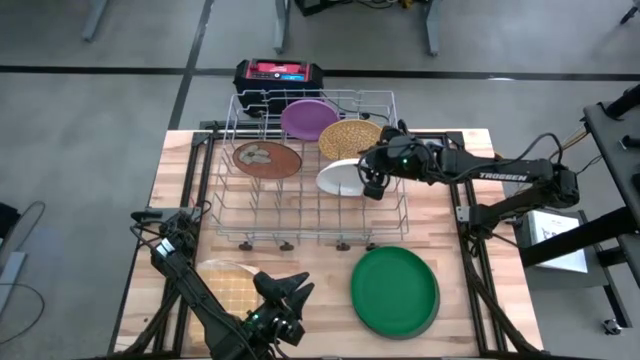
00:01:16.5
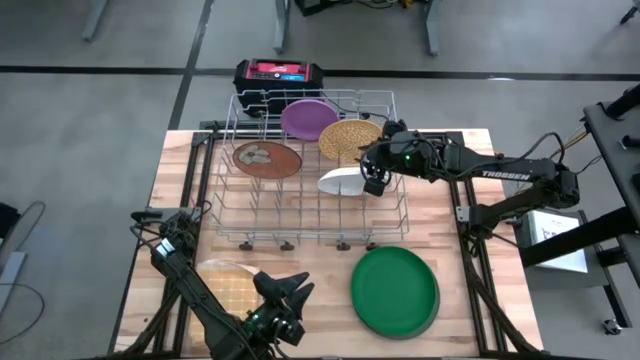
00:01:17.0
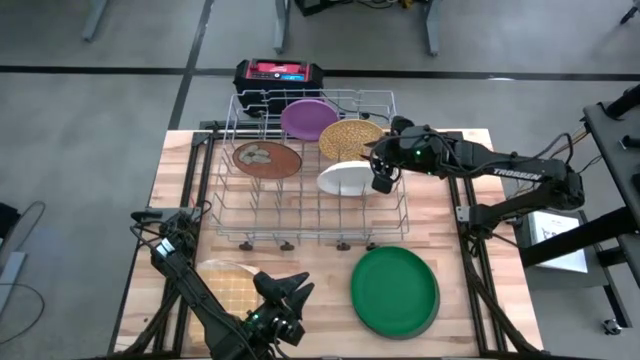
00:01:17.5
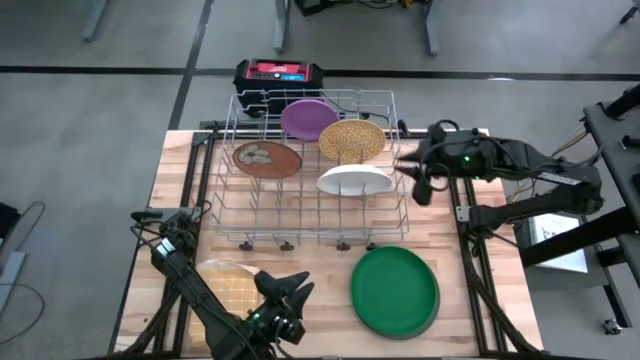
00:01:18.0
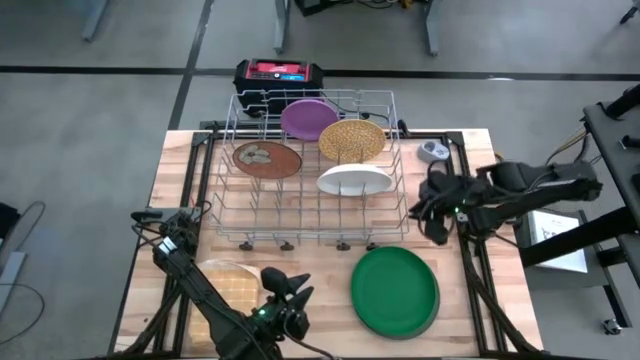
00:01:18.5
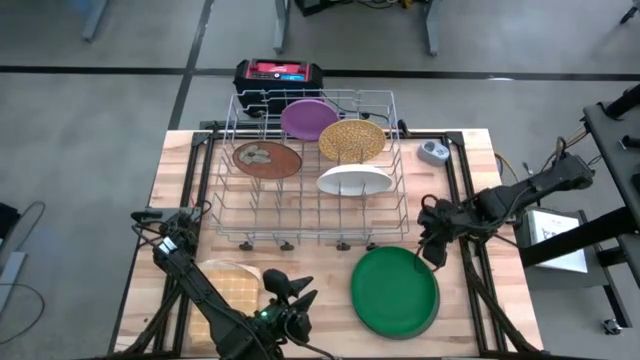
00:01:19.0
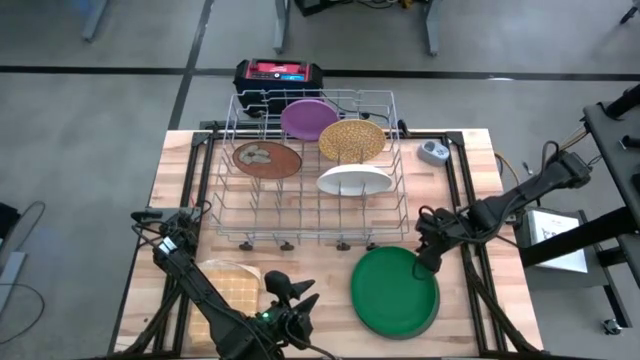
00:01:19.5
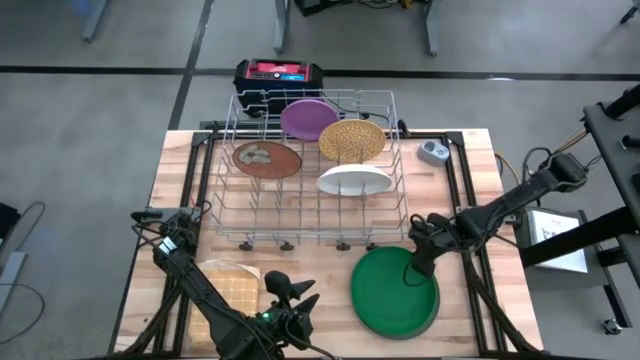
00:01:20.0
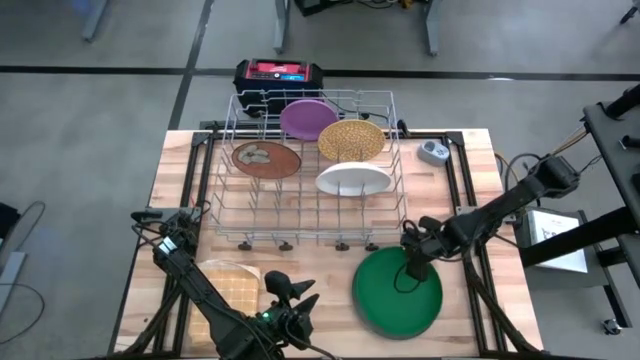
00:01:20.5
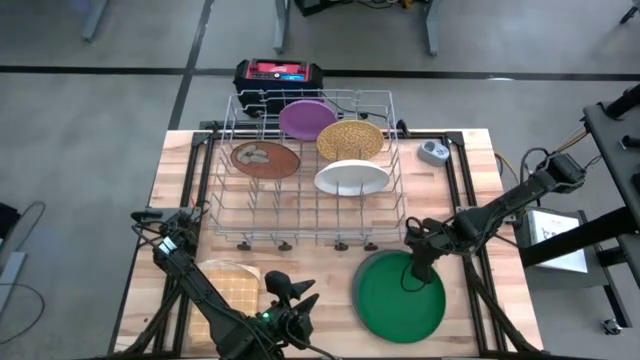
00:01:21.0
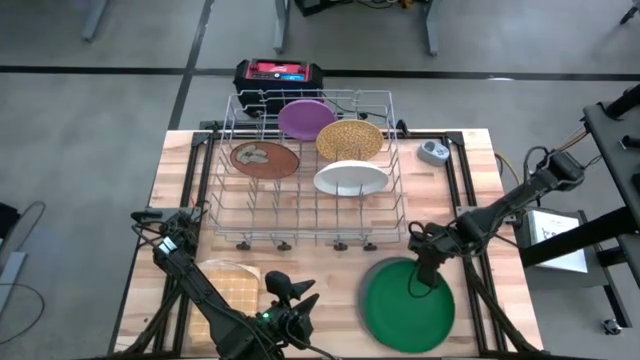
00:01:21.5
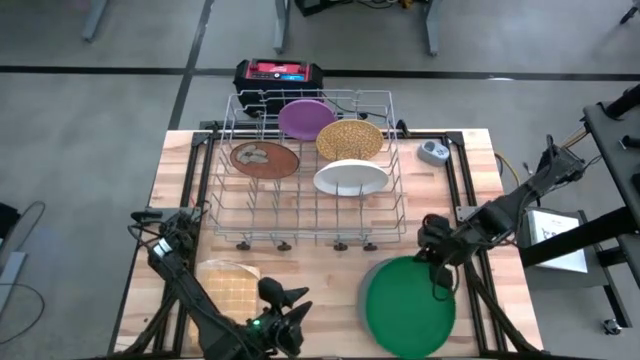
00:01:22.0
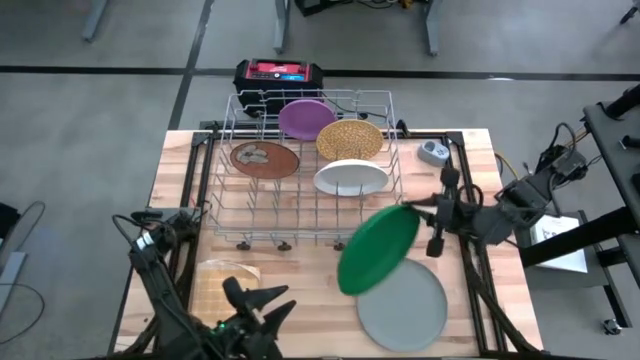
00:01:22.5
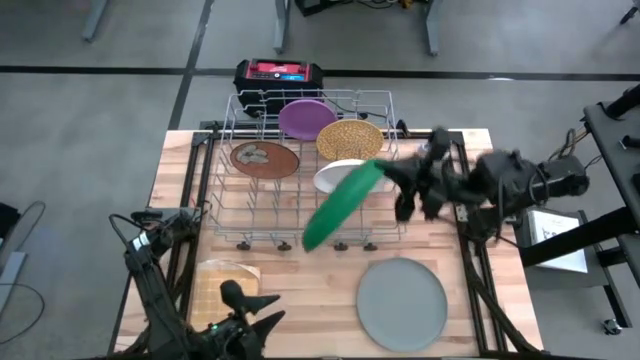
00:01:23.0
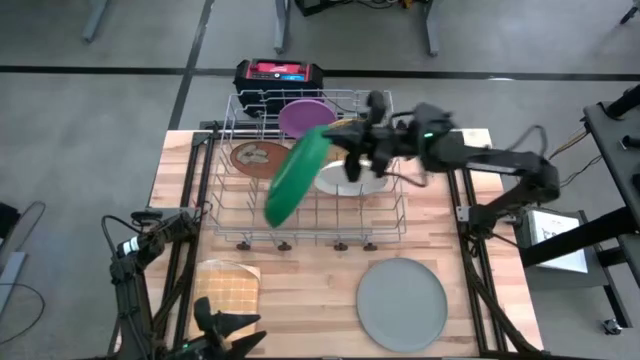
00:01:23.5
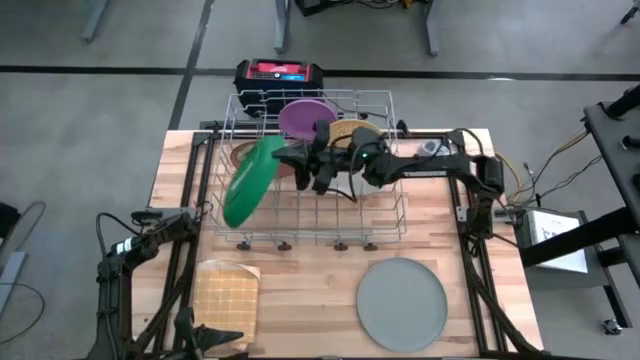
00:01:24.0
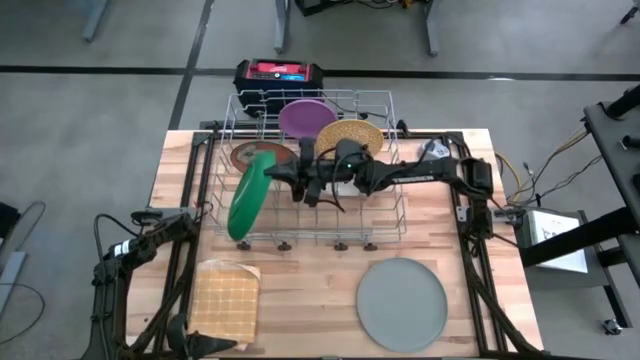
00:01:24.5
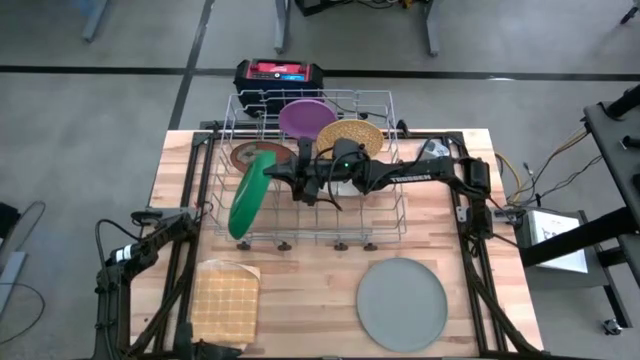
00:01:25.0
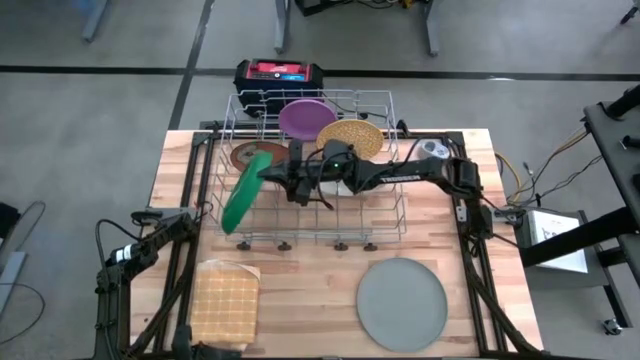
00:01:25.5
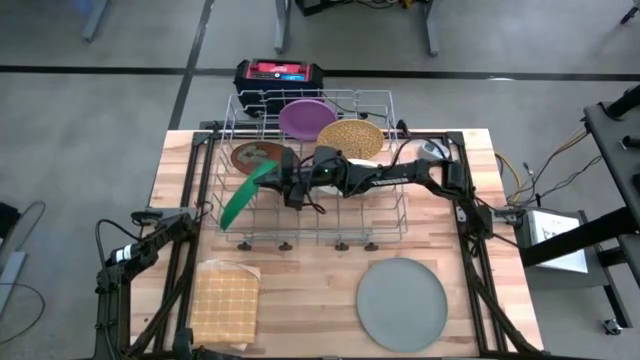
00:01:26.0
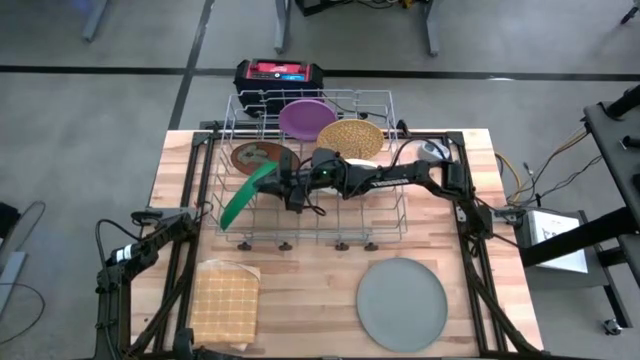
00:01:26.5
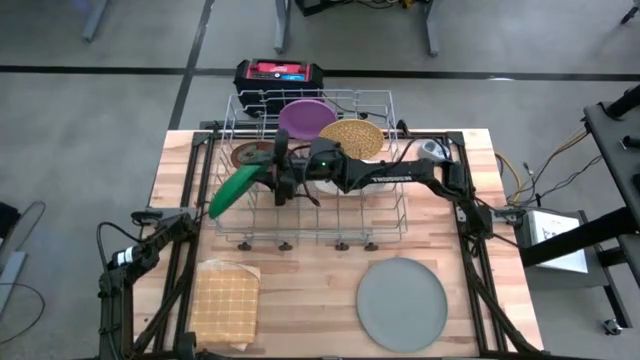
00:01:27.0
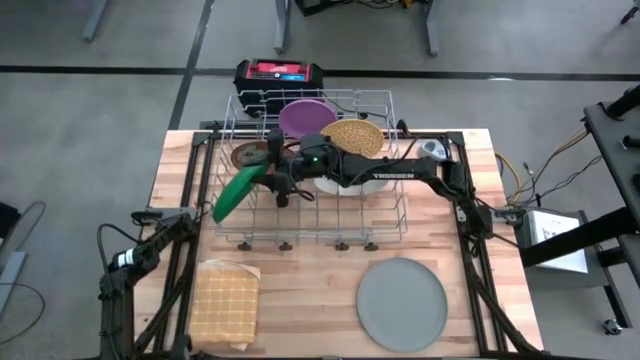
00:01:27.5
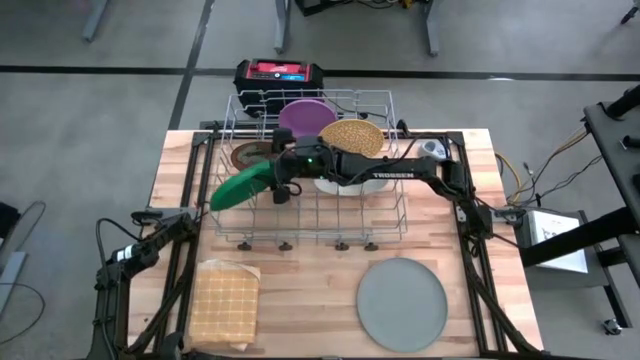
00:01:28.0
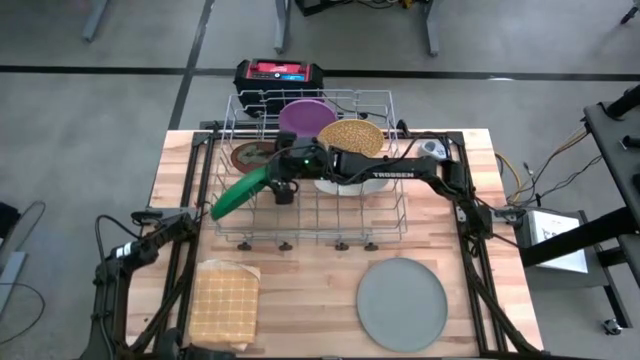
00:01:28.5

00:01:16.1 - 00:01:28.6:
Task: Sort dishes
Put the green plate into the dish rack
